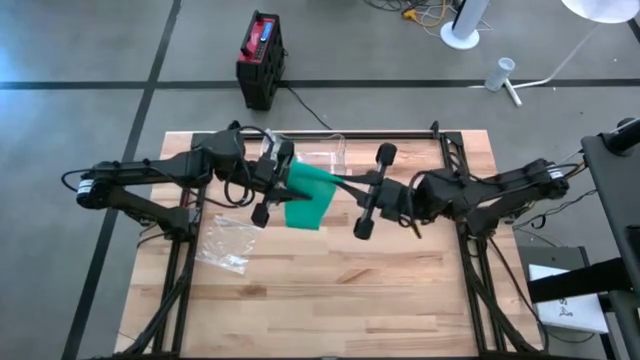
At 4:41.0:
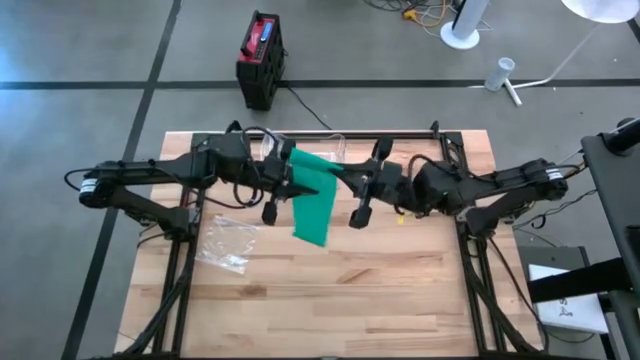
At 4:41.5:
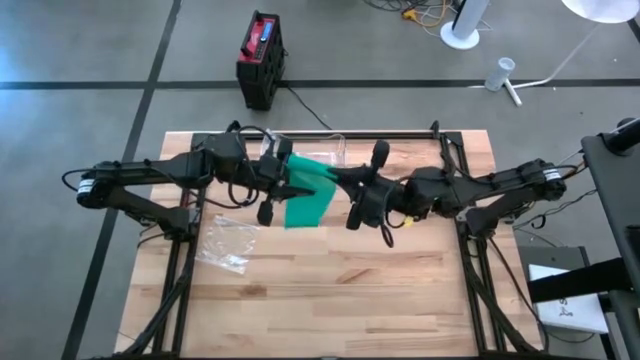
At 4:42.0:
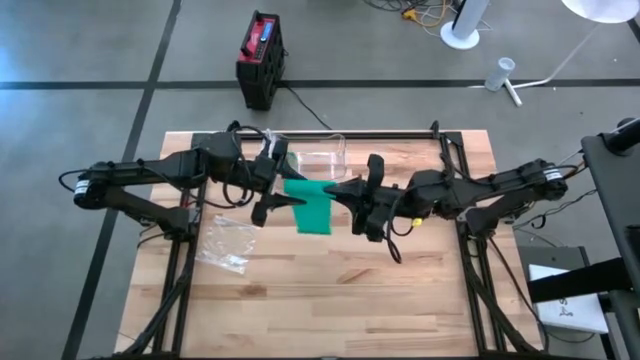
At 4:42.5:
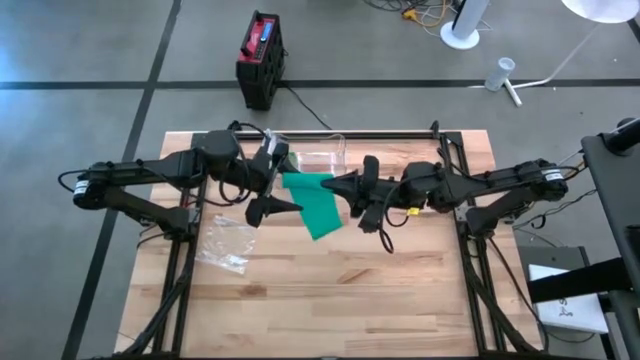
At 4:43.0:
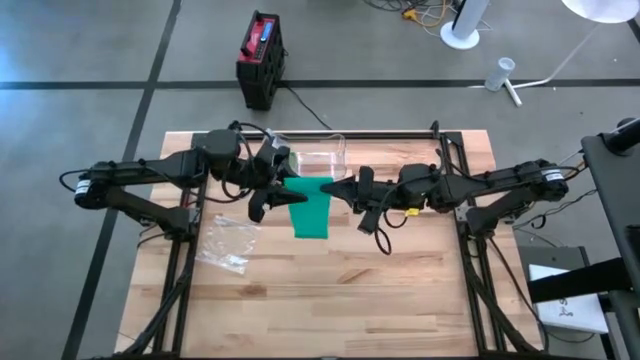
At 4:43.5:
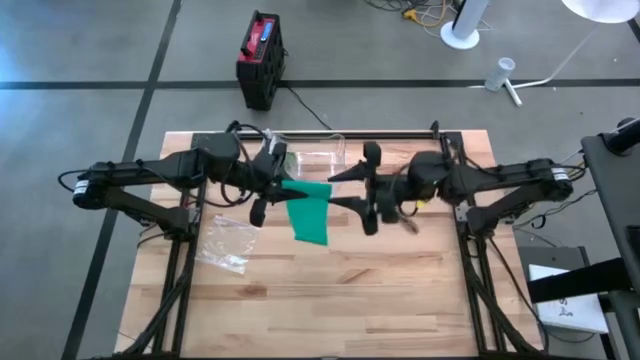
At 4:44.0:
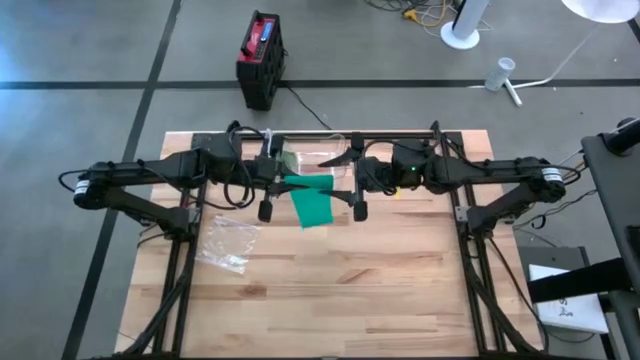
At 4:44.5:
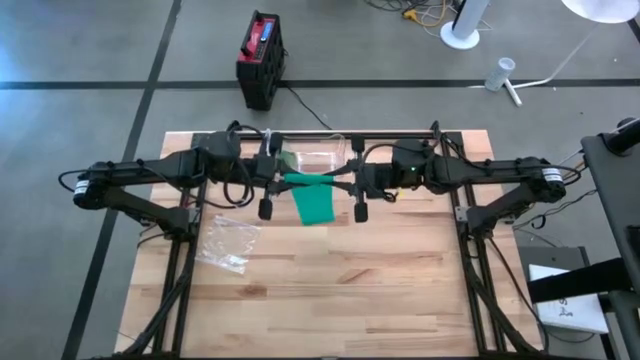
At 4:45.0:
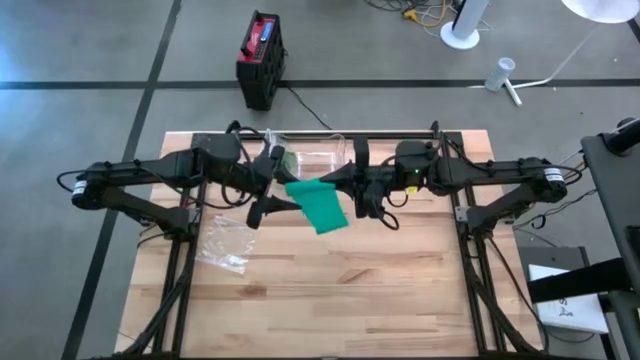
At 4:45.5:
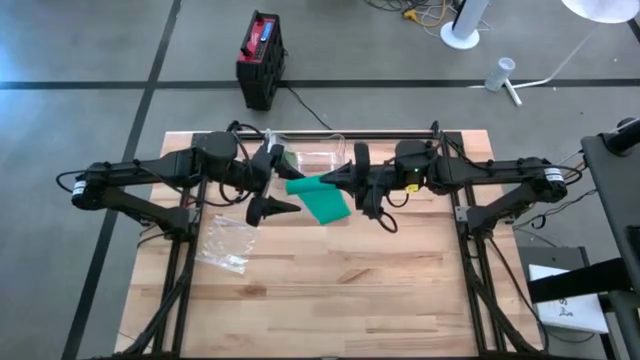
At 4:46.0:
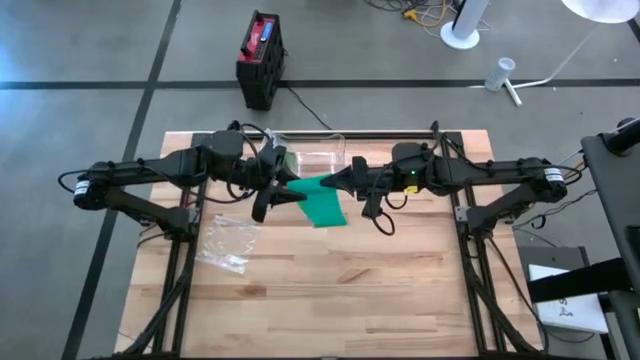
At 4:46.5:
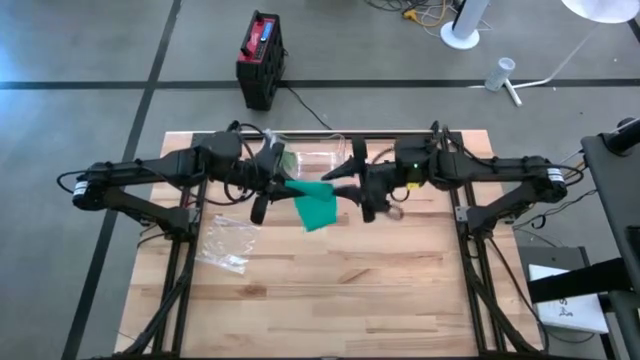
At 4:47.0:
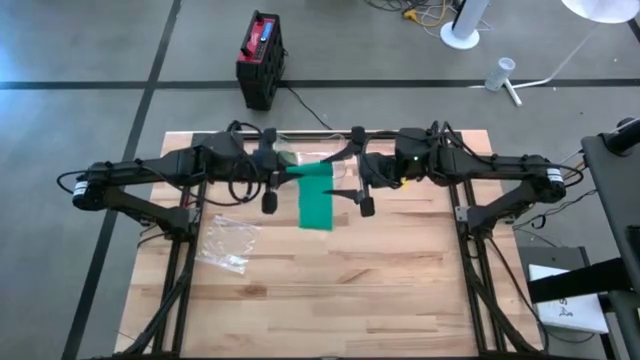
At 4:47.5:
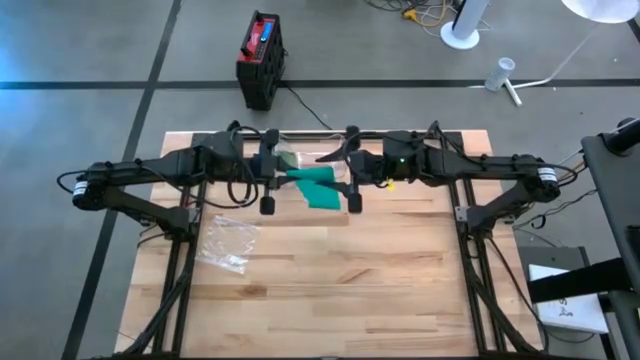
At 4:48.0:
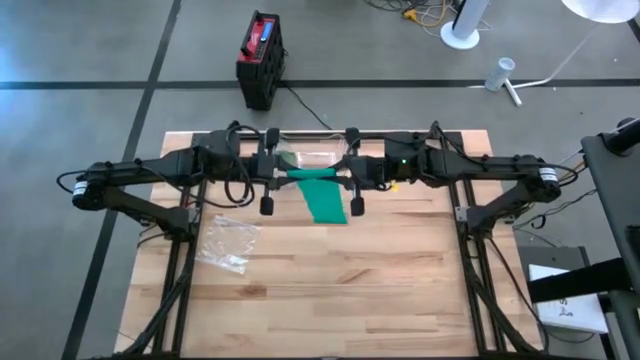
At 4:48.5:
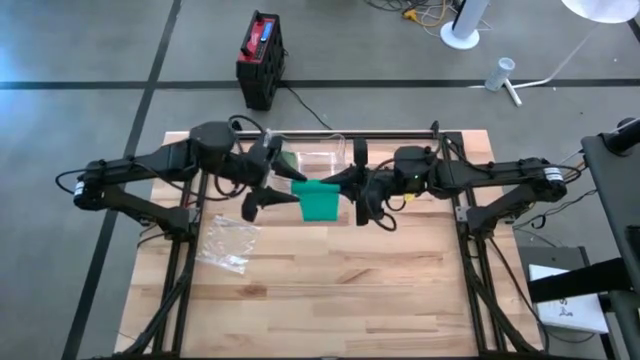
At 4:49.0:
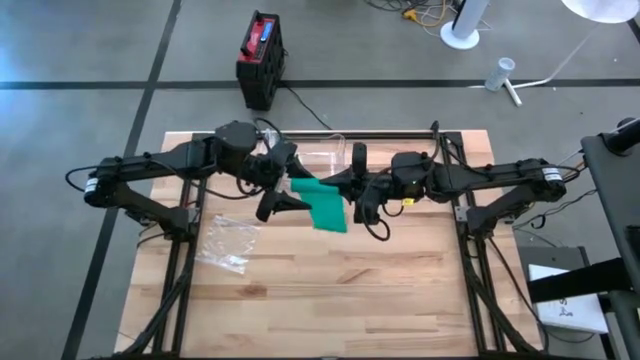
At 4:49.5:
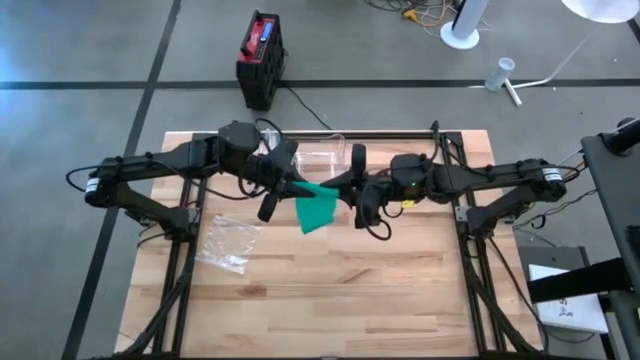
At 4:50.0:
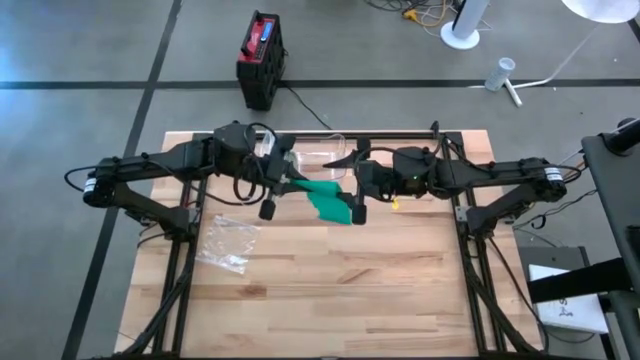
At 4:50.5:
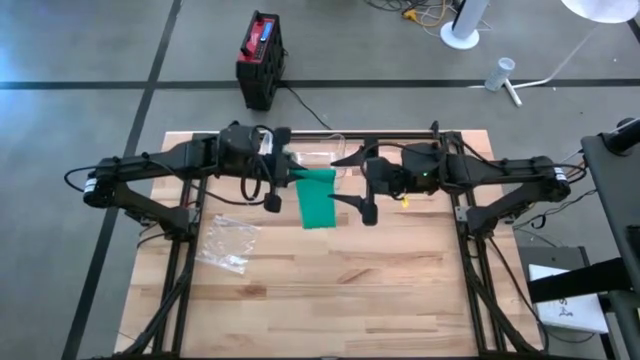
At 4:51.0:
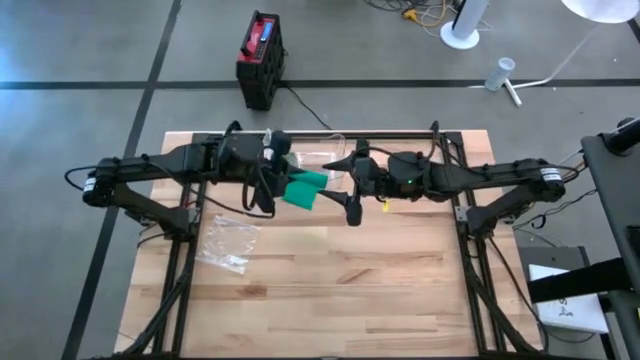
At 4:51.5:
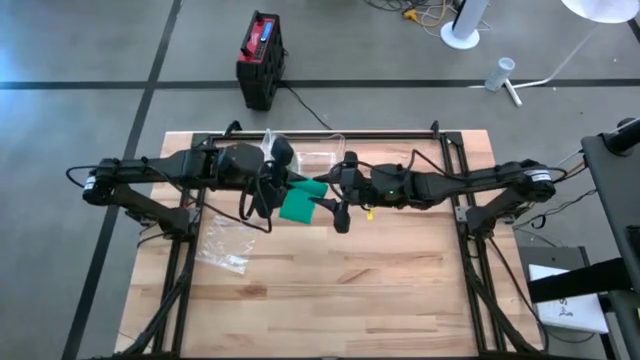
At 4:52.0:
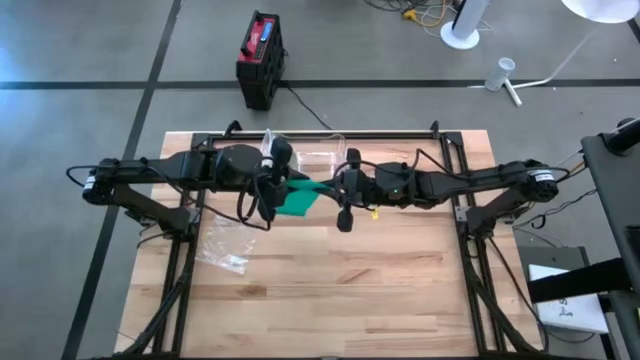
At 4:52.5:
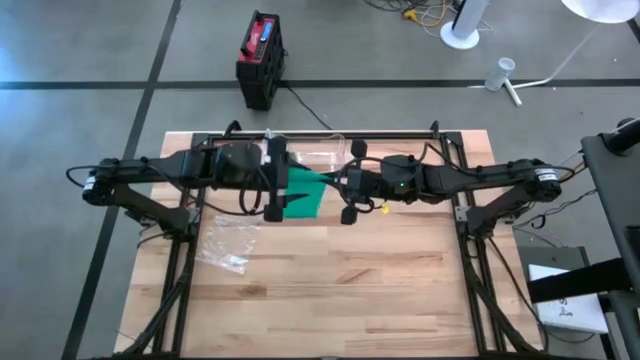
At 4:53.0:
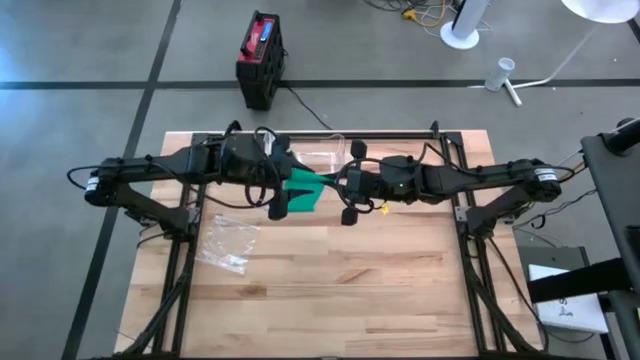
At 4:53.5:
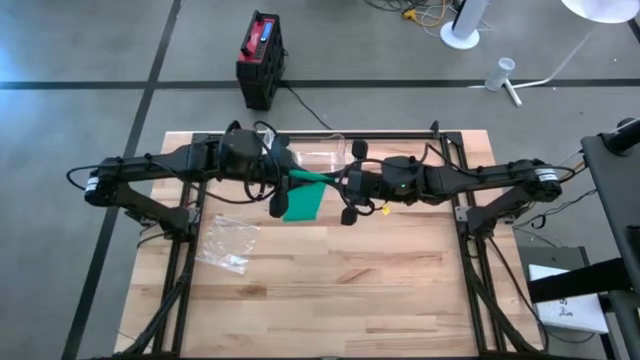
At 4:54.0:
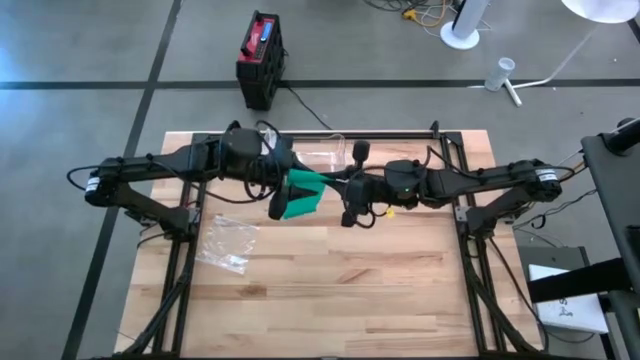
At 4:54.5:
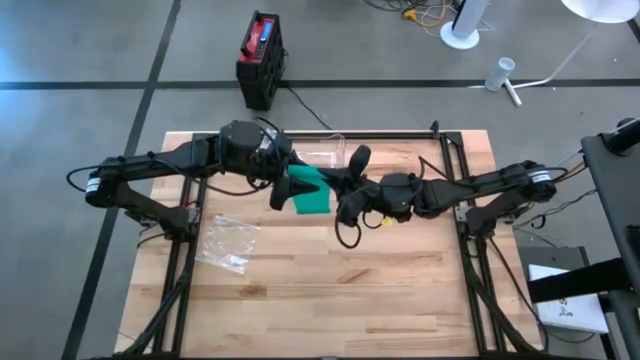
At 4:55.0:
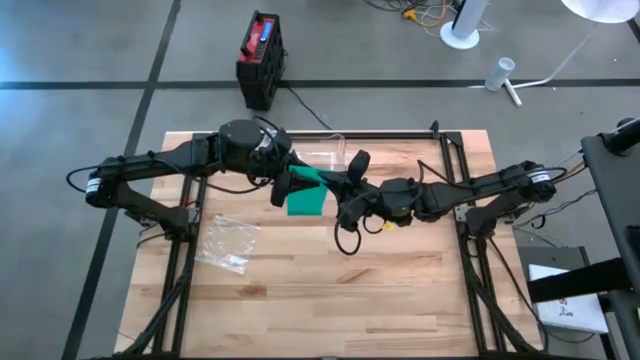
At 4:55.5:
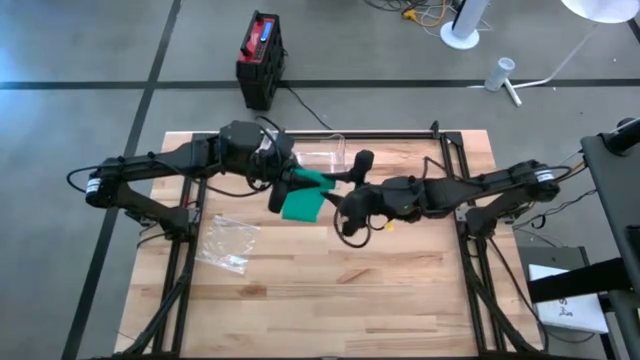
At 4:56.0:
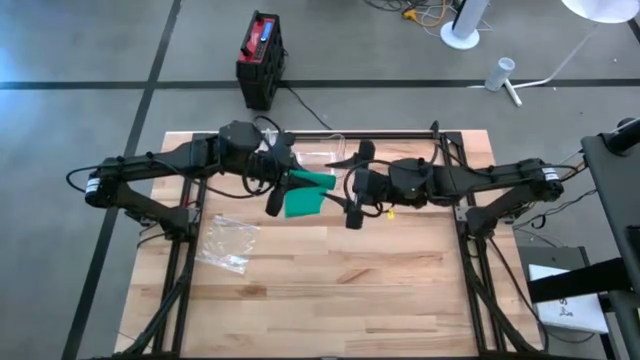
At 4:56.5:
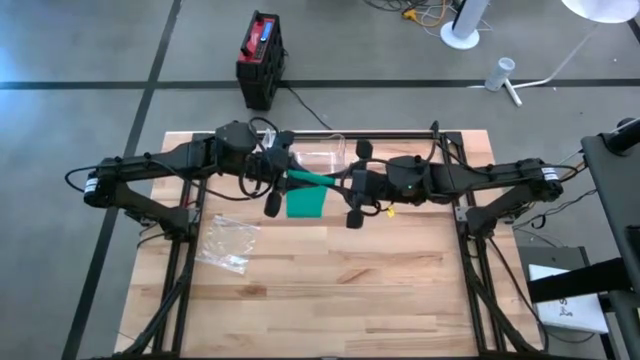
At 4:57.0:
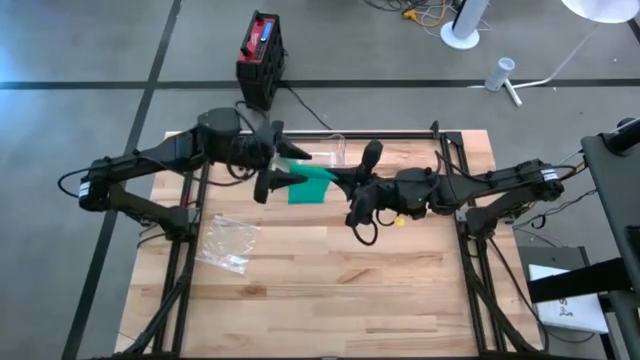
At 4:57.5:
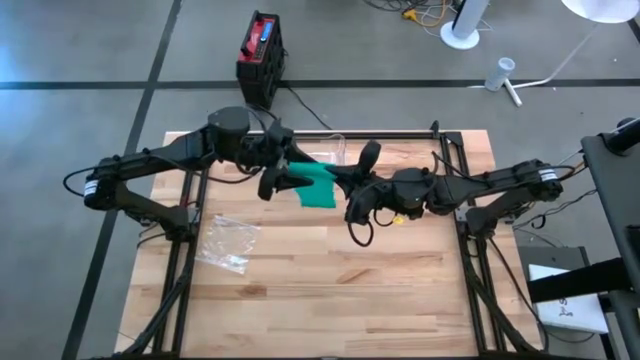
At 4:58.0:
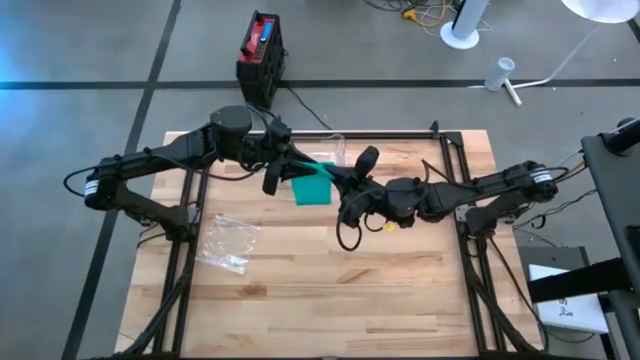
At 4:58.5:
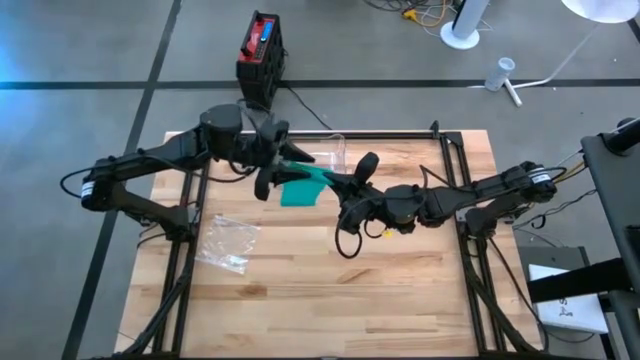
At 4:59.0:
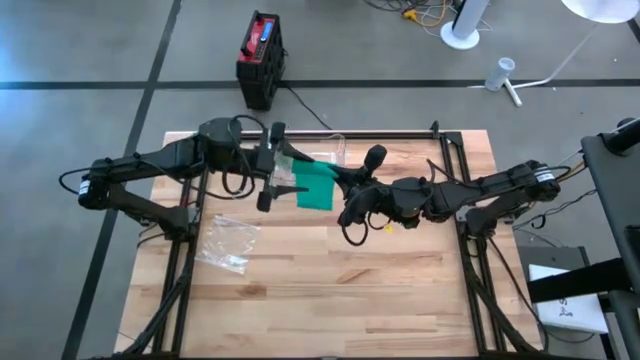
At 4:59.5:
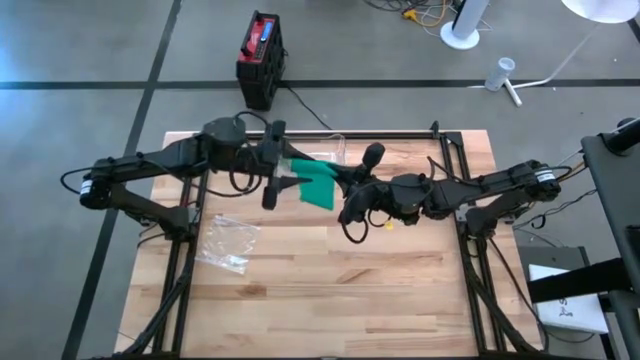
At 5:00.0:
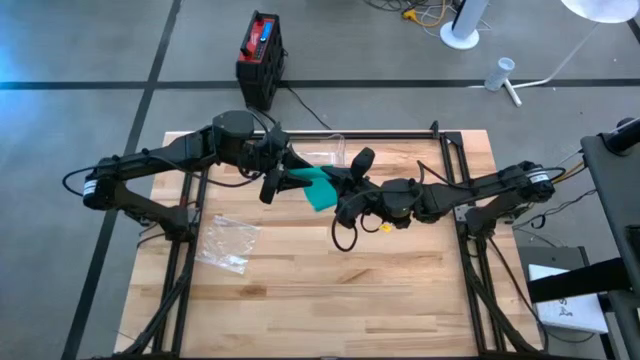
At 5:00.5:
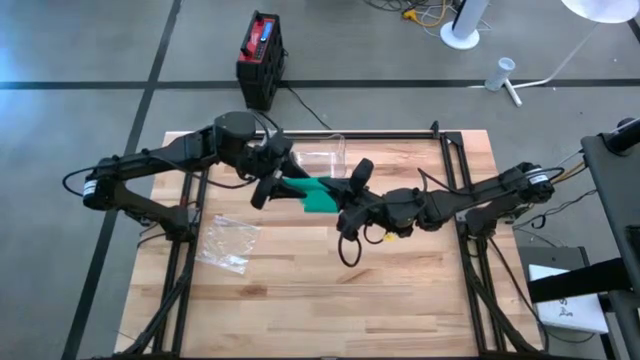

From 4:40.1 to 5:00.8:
Task: Roll bandage
Roll the blue bandage
